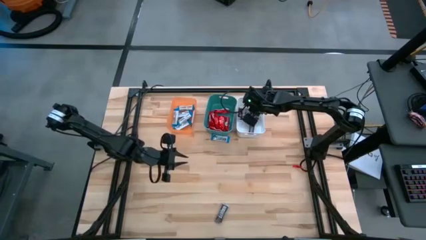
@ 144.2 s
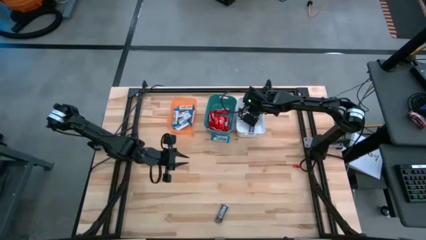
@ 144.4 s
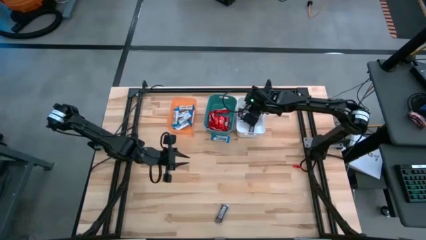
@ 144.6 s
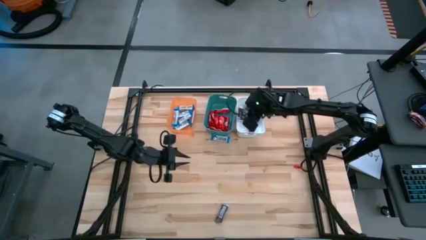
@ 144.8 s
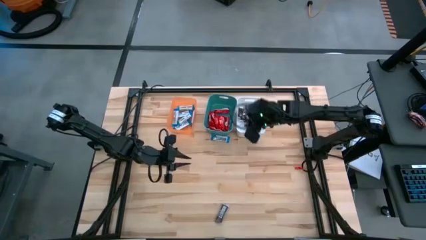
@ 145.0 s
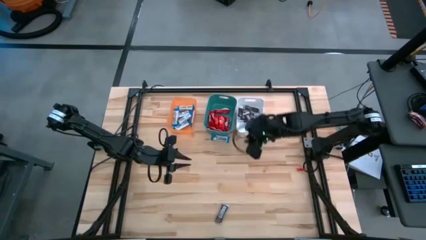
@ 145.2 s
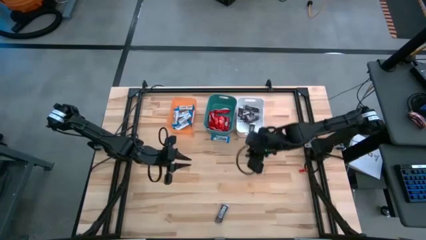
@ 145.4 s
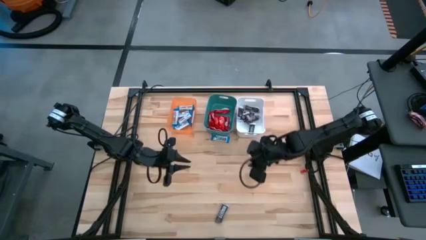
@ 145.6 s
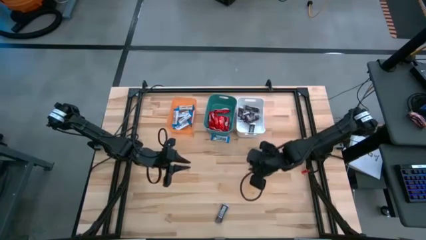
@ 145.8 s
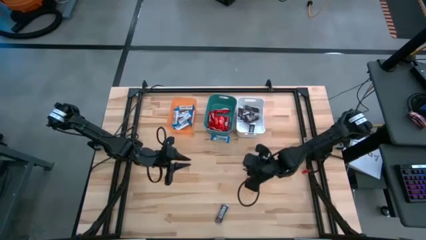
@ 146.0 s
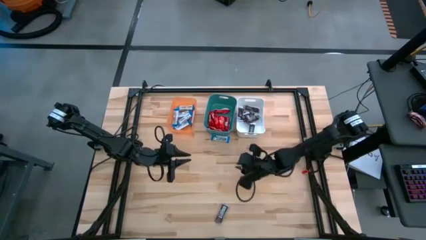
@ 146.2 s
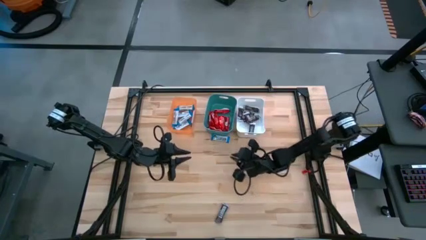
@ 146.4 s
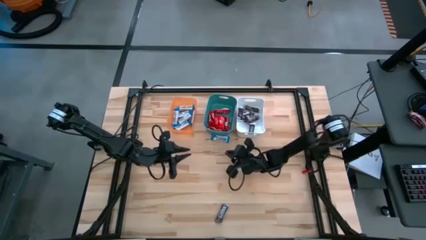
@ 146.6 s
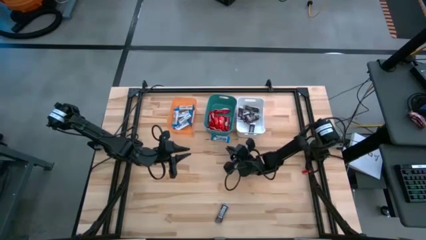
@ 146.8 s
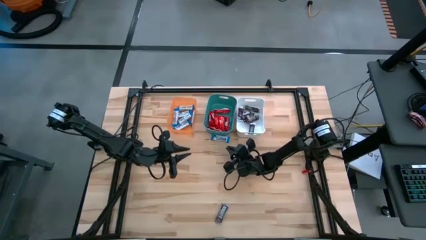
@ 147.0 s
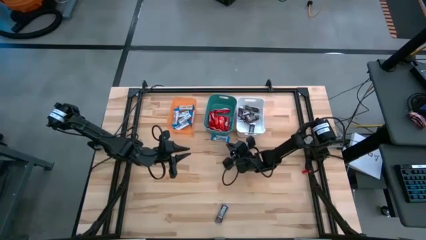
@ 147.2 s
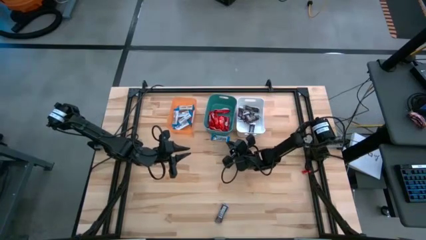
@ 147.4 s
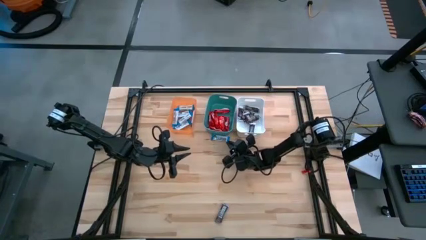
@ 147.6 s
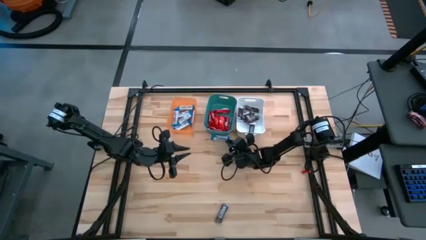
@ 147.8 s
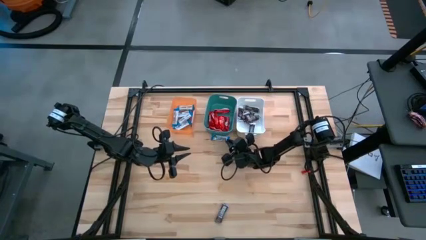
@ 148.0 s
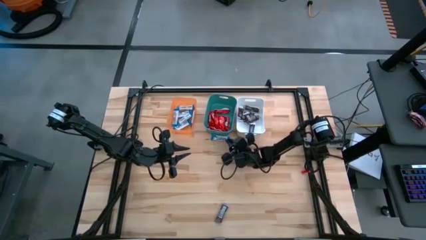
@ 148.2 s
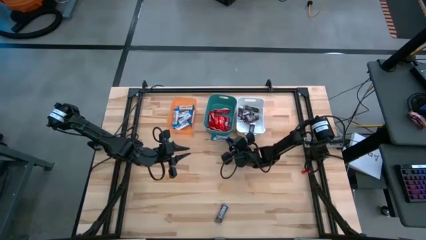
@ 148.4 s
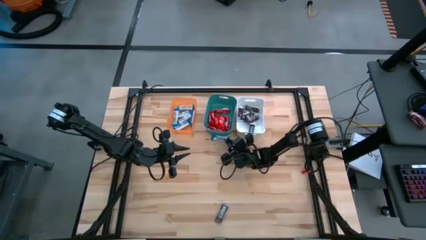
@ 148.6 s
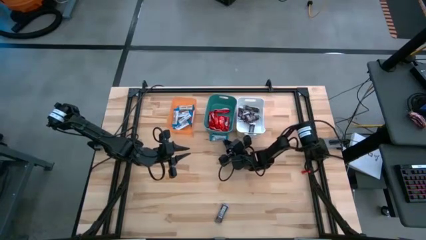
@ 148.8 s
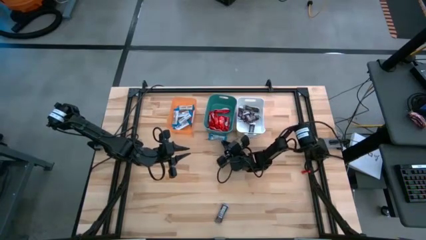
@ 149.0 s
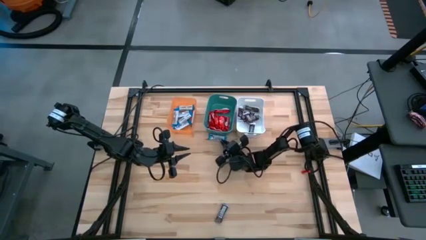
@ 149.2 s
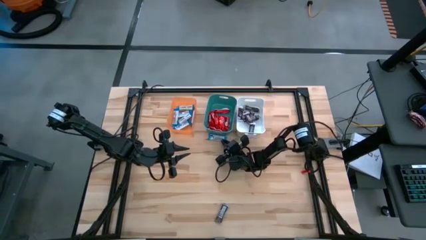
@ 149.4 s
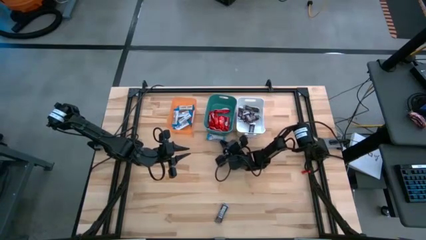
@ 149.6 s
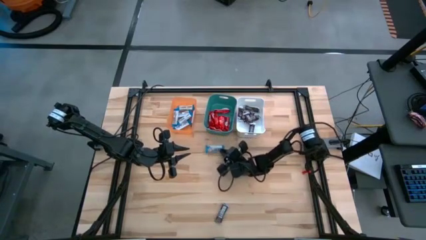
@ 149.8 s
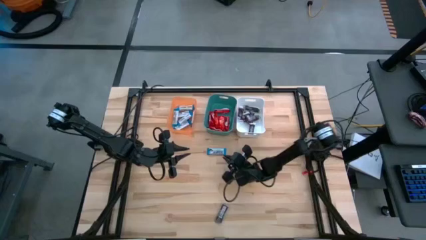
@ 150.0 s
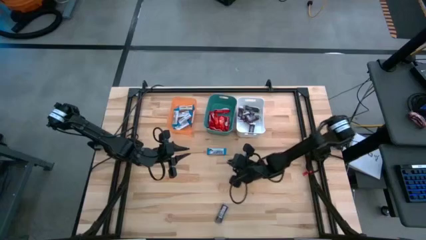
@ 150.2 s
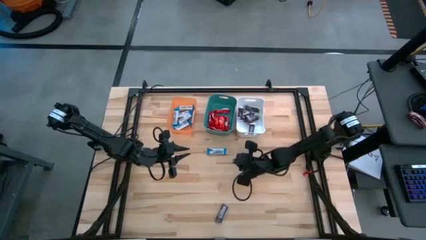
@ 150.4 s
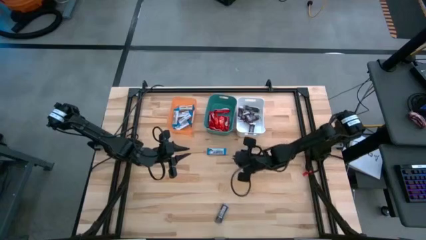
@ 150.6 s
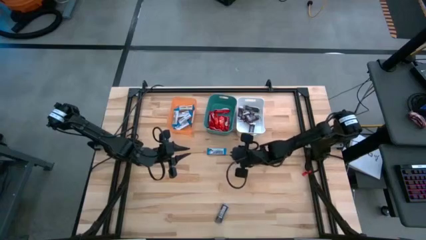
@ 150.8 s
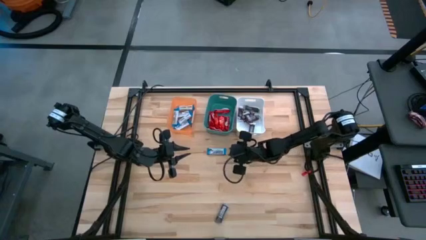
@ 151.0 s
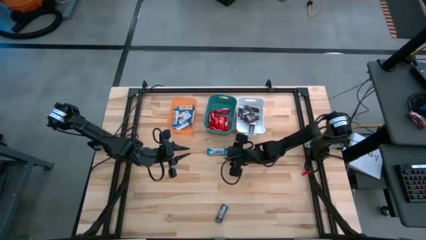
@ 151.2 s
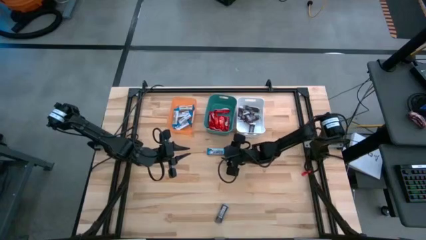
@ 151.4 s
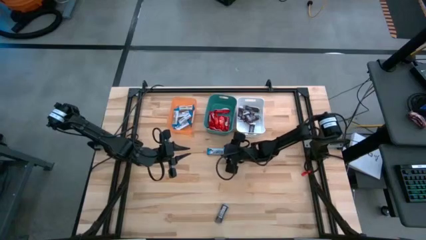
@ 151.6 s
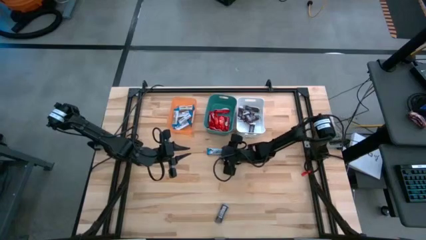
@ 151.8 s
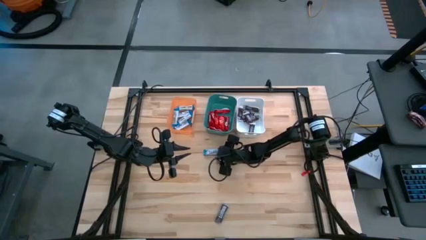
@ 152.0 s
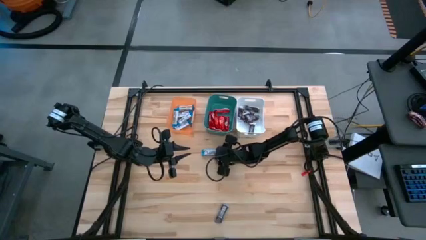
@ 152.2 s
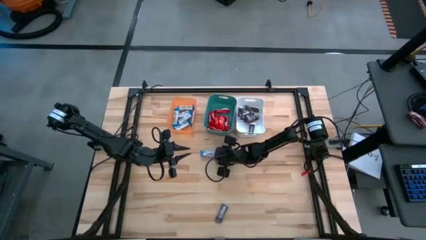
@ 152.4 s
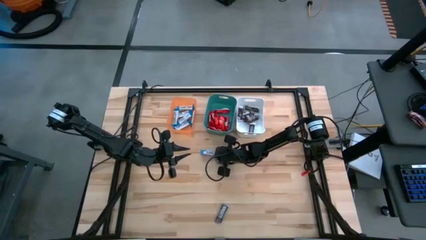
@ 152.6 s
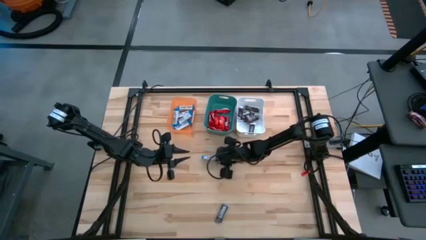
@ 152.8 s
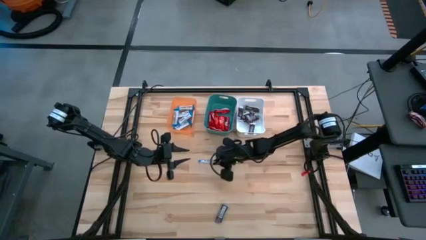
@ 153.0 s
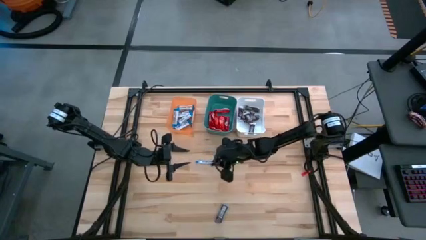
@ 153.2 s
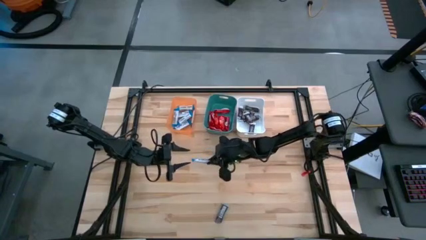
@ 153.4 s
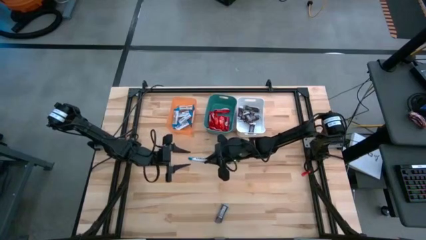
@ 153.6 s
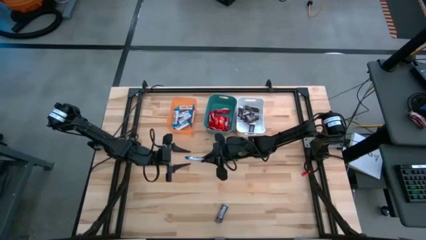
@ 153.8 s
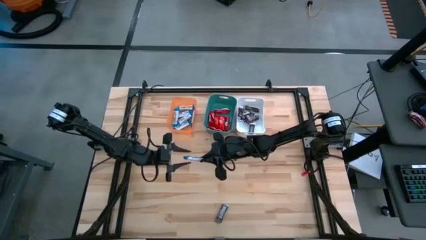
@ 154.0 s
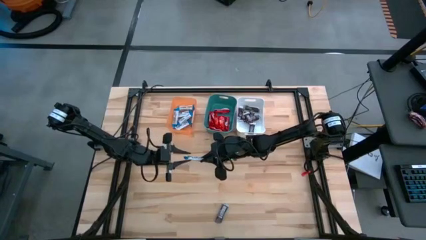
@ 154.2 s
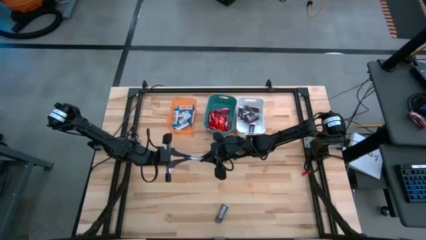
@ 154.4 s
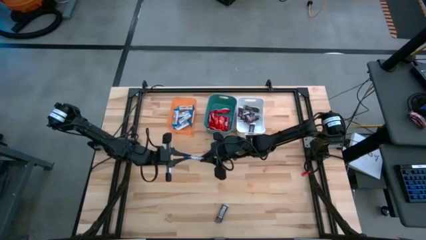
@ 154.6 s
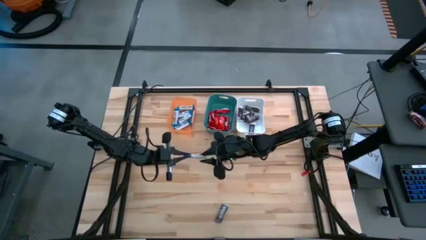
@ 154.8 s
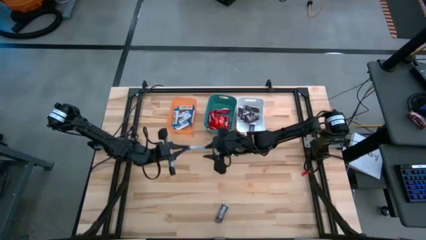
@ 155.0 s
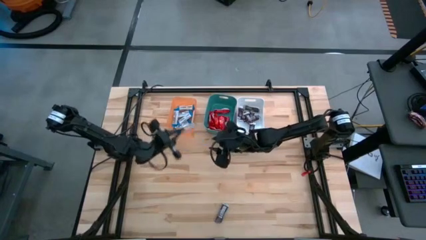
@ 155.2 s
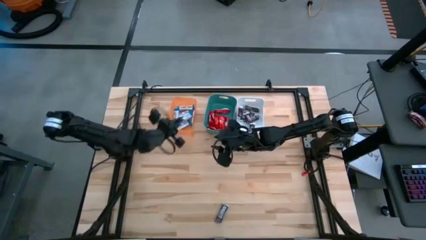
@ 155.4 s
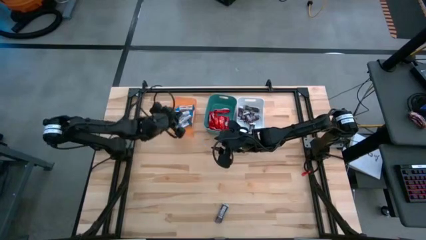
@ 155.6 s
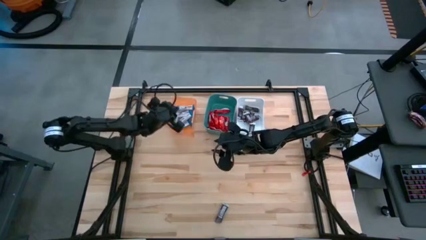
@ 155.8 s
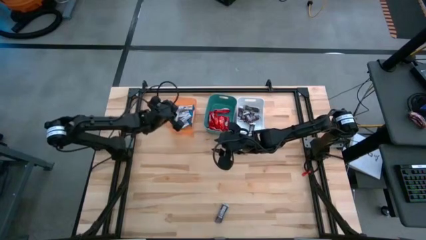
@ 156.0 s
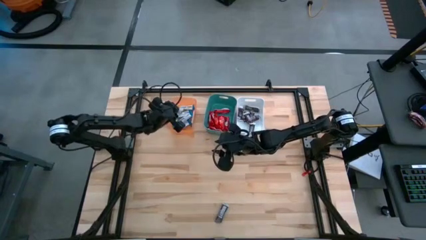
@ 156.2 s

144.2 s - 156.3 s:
Task: Organize candy in baskets
Put the white chocolate into the orange bin

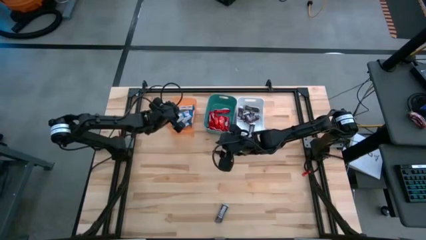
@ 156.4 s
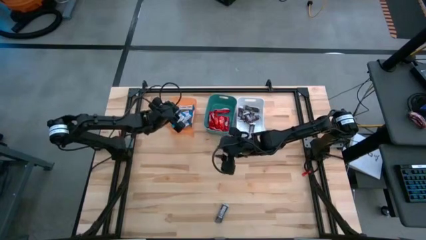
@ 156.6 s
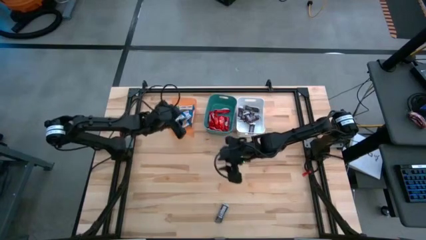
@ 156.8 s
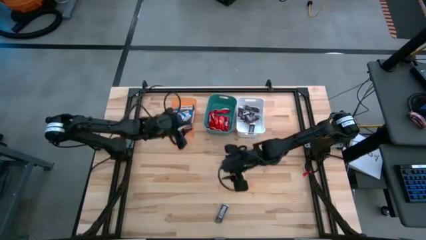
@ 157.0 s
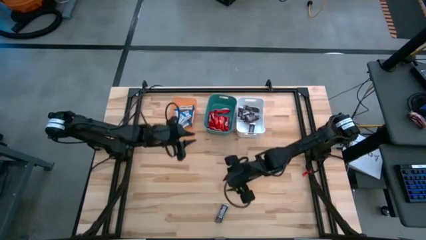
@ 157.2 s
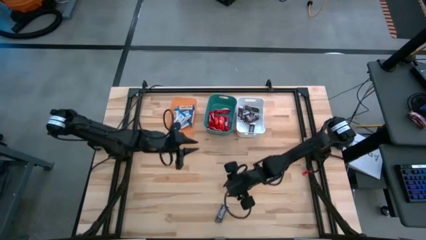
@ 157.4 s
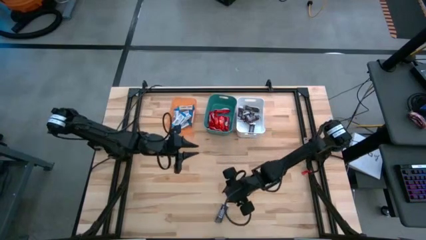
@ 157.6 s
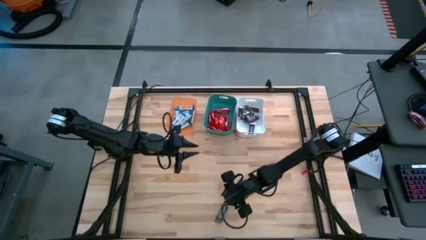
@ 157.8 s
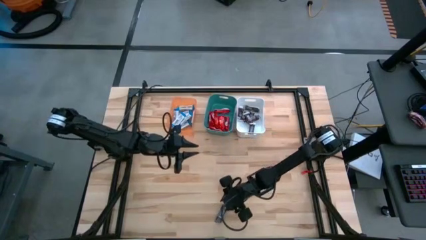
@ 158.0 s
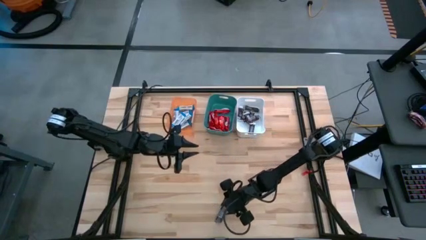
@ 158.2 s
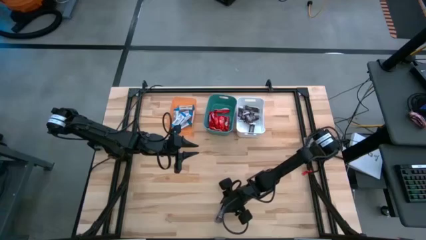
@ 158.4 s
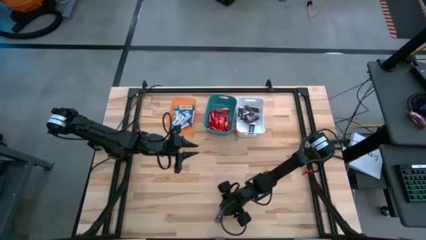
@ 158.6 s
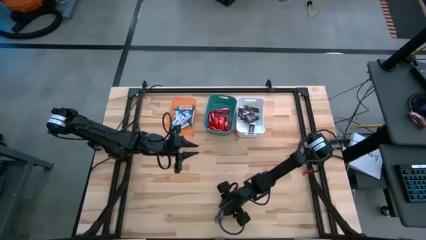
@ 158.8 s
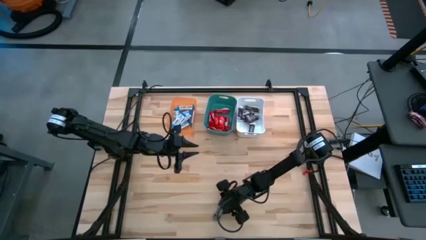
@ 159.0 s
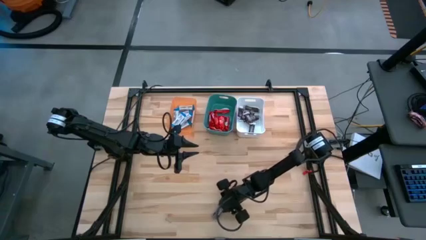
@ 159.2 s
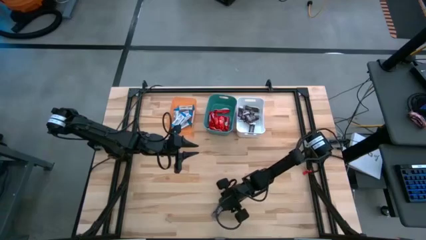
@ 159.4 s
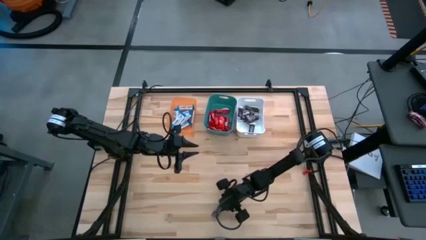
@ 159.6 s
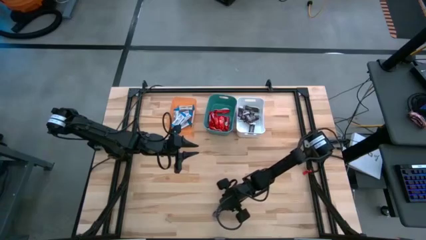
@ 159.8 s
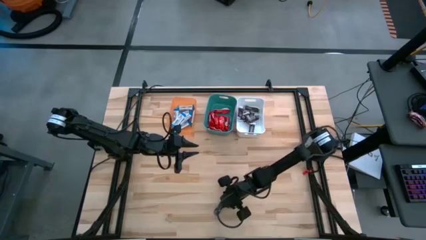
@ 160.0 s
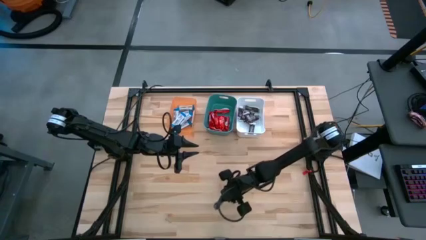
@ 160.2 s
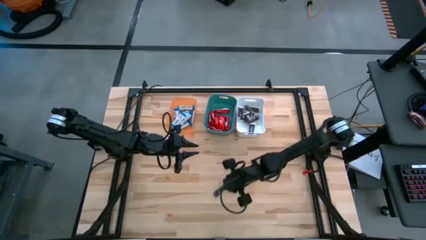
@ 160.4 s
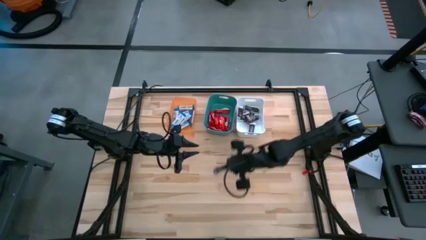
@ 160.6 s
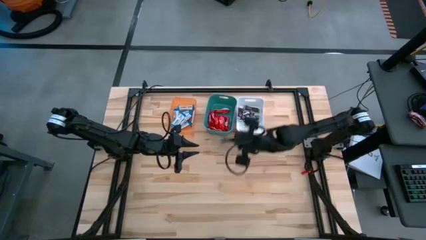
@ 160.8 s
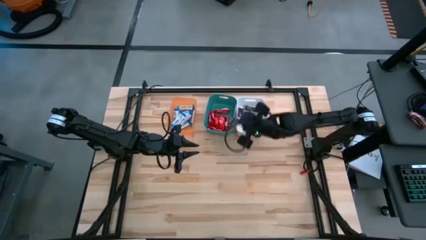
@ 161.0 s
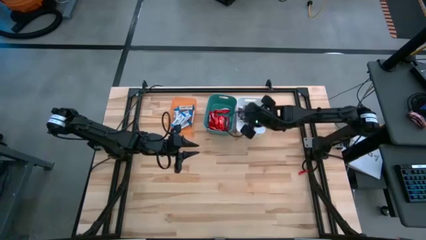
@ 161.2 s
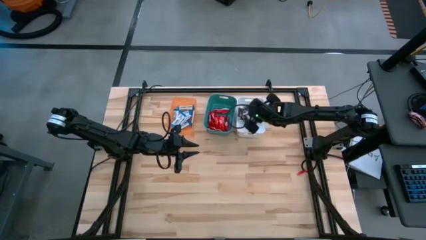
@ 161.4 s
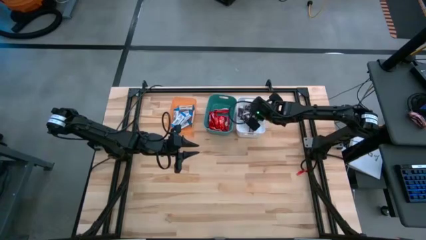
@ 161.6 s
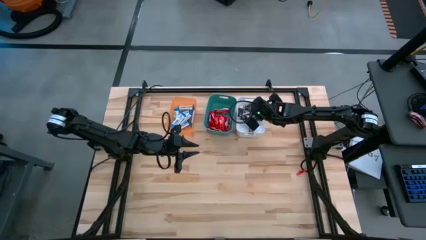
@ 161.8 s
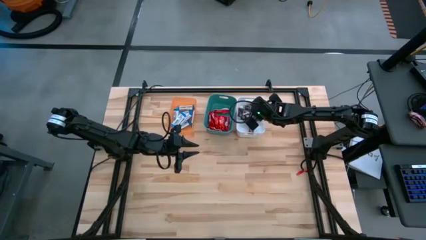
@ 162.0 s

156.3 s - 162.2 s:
Put the brown chocolate into the white bin
